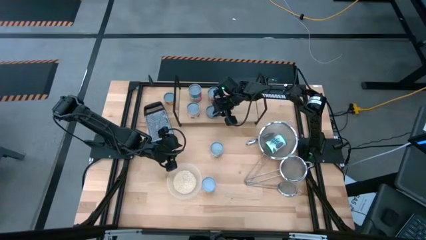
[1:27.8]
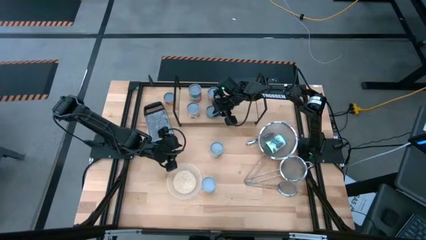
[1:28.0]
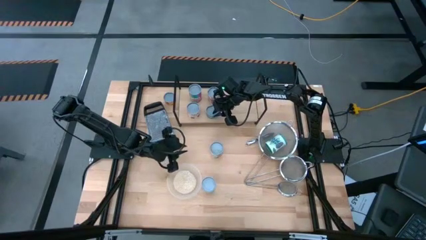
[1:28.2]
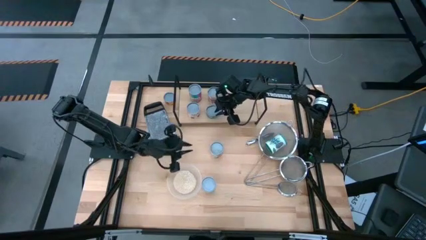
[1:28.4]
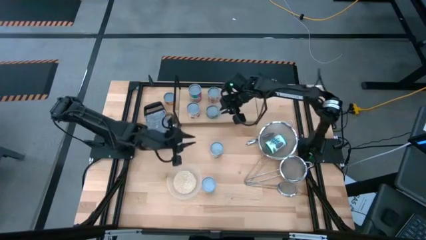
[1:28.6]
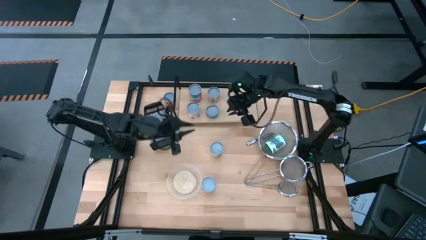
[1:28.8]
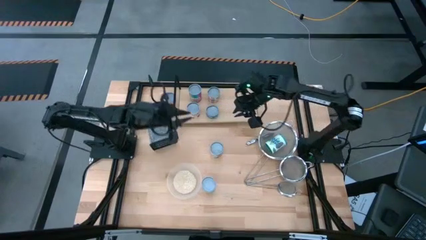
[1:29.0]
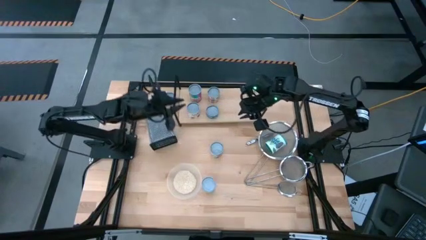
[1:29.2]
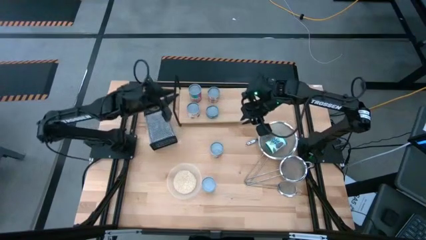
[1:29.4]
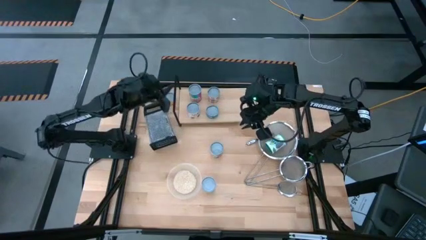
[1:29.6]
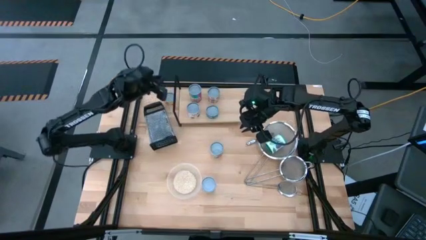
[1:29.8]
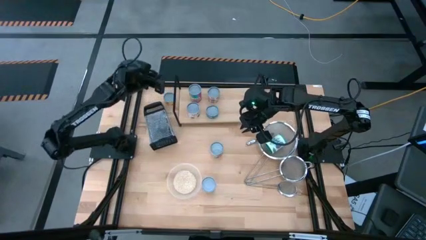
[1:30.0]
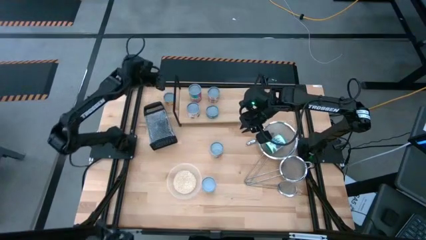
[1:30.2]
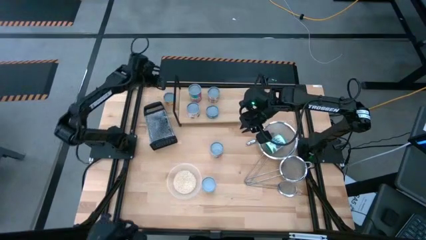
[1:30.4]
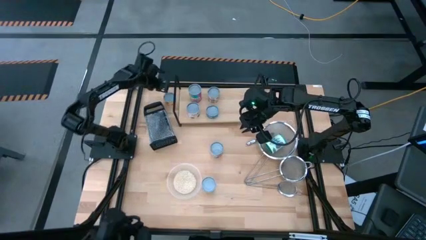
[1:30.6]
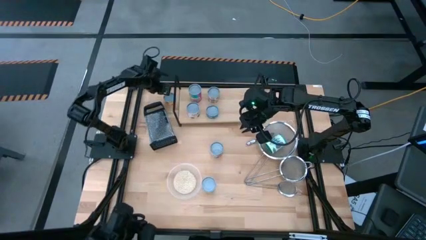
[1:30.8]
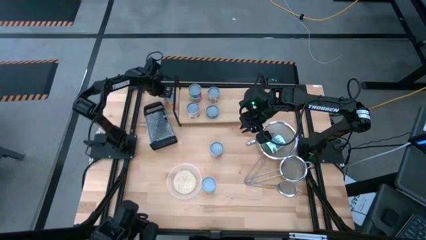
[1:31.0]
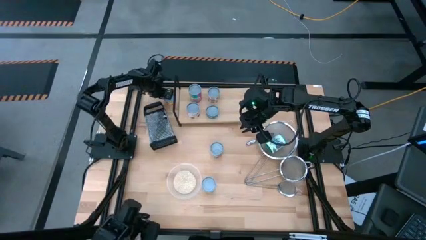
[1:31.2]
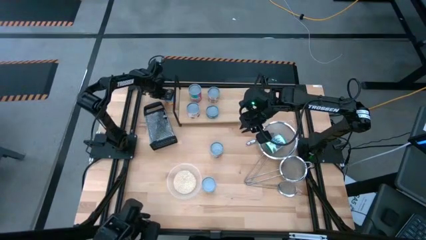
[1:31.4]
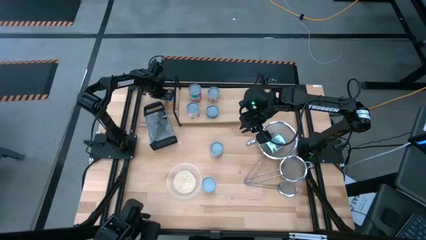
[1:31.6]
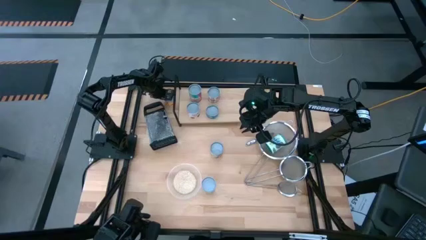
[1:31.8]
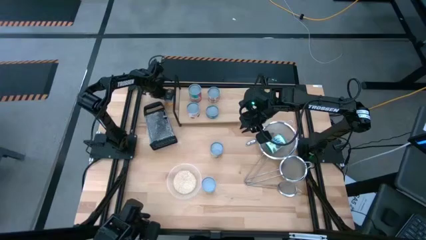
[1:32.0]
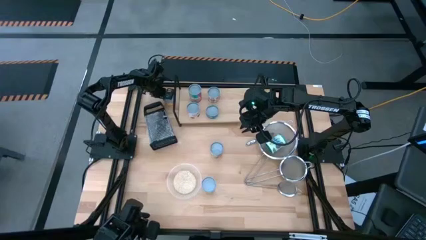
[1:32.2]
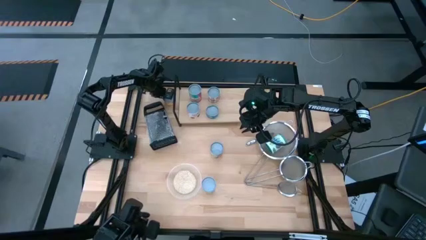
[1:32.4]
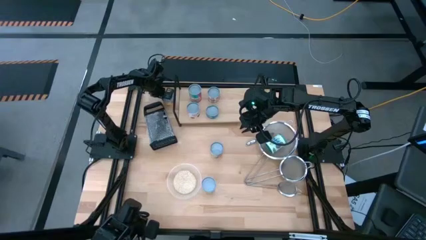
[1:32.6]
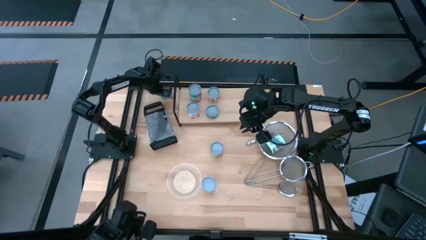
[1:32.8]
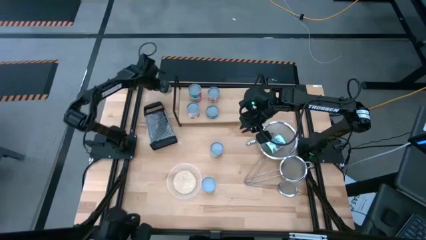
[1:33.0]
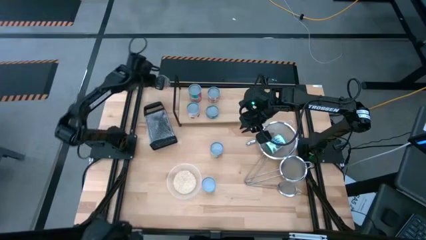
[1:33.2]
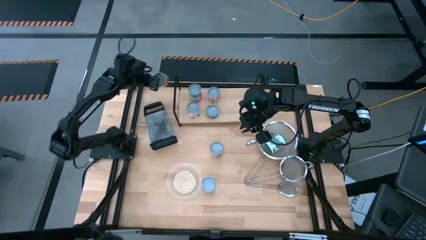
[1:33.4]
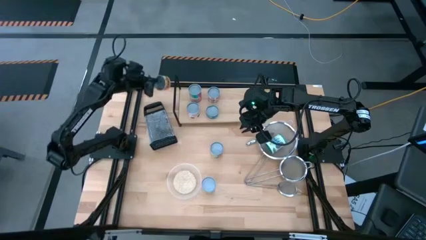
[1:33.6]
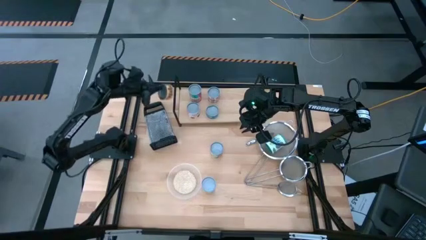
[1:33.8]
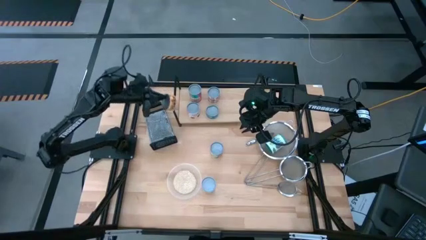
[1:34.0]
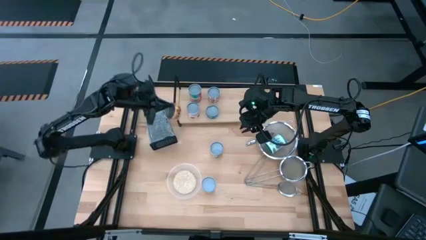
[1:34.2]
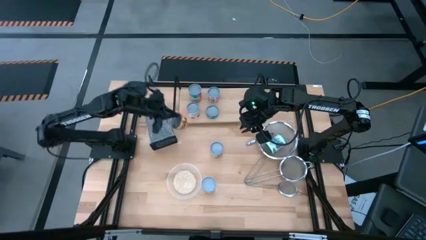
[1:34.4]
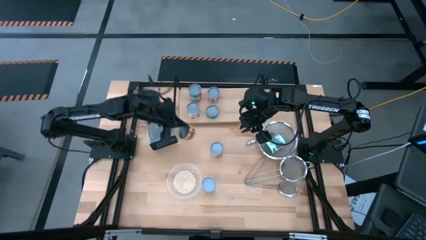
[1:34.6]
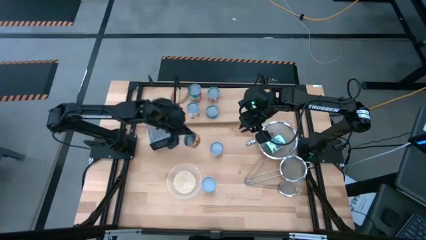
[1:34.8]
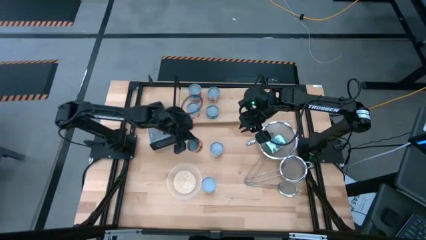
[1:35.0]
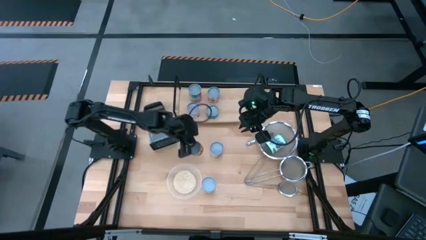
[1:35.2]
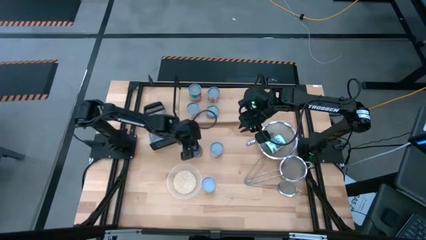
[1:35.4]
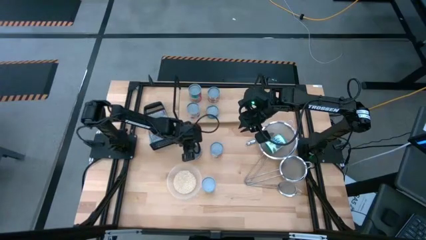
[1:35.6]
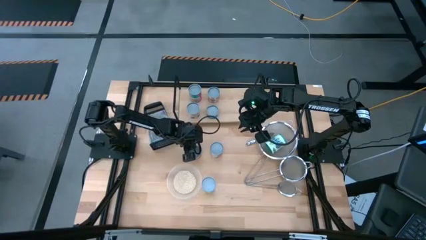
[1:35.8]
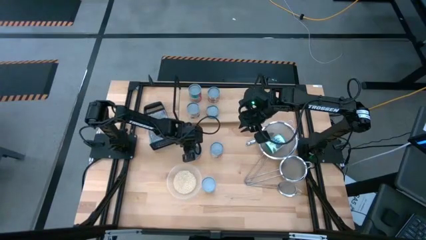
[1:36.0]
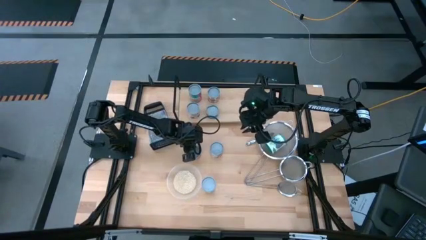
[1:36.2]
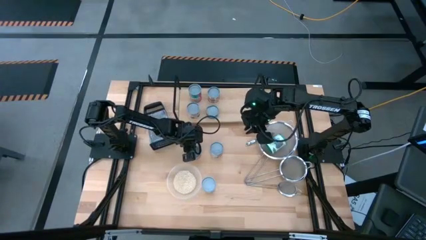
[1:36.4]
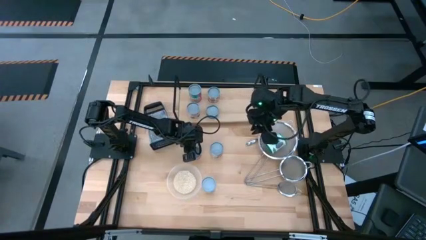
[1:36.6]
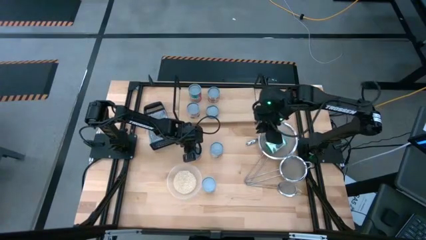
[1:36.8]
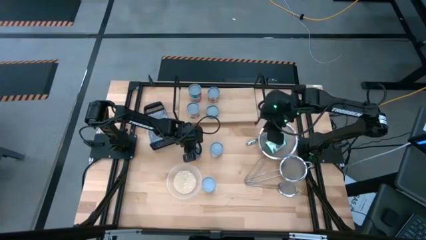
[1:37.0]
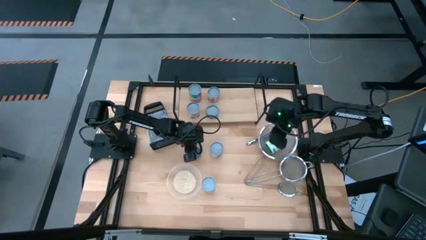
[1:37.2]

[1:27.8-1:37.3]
Task: Pick and place cans onto a shelf
Move the yellow pineapple can to middle of the table
